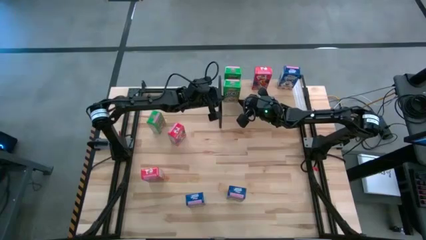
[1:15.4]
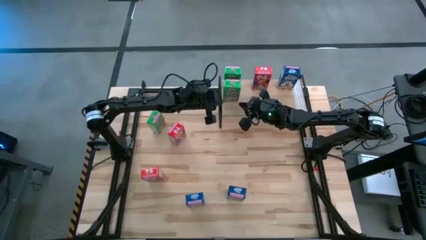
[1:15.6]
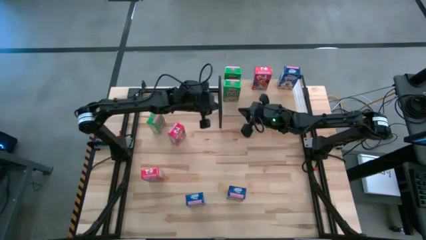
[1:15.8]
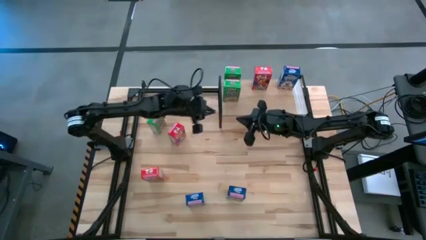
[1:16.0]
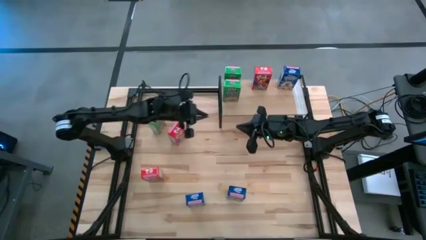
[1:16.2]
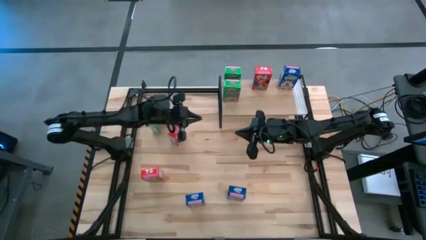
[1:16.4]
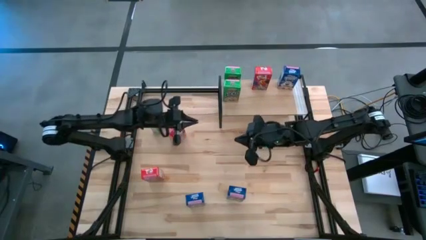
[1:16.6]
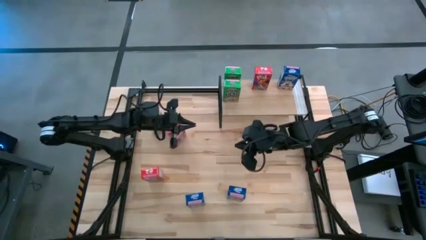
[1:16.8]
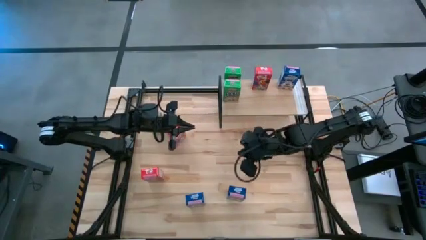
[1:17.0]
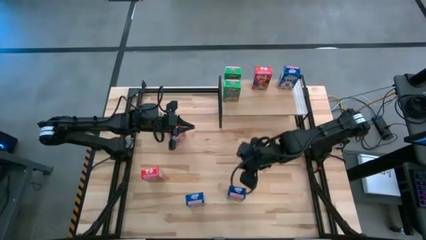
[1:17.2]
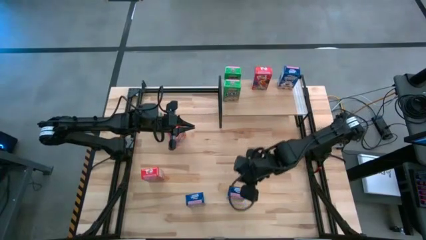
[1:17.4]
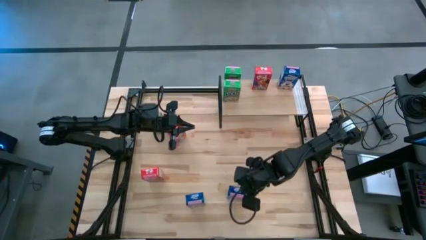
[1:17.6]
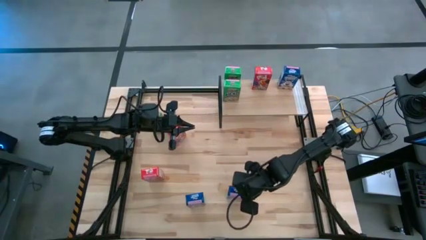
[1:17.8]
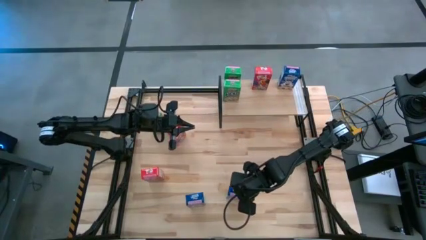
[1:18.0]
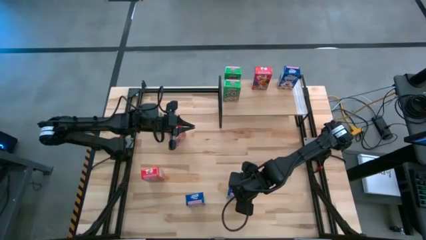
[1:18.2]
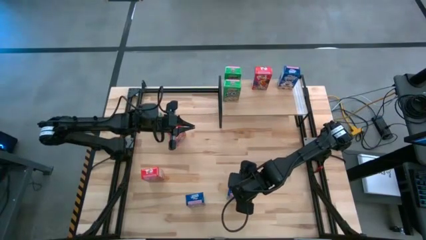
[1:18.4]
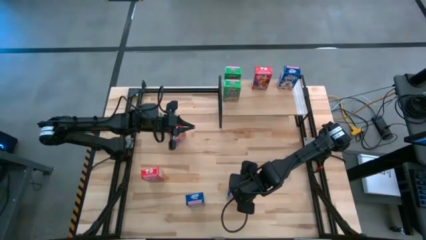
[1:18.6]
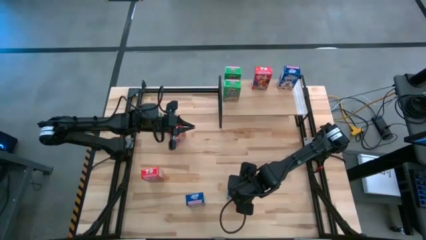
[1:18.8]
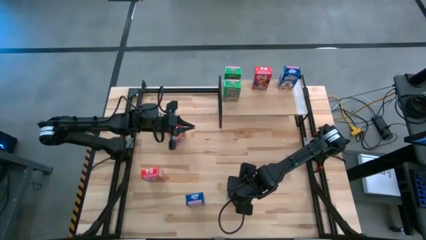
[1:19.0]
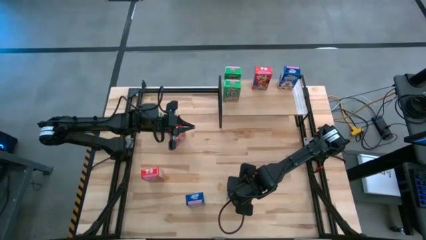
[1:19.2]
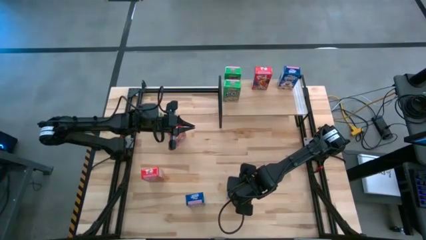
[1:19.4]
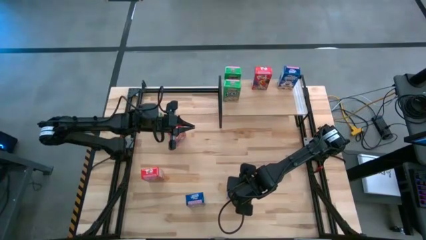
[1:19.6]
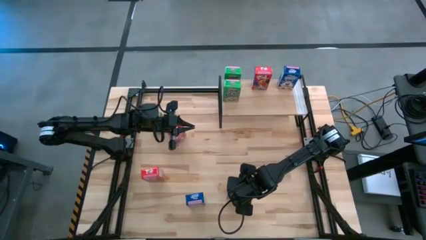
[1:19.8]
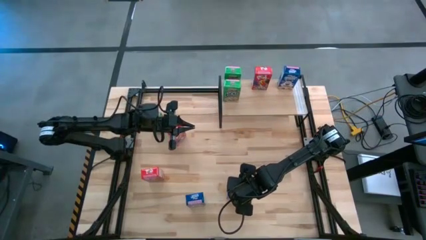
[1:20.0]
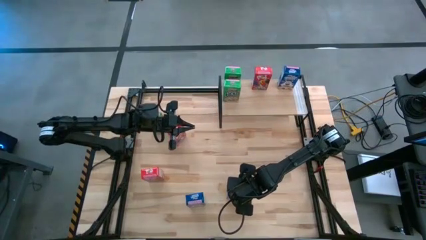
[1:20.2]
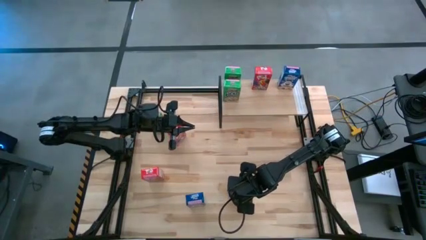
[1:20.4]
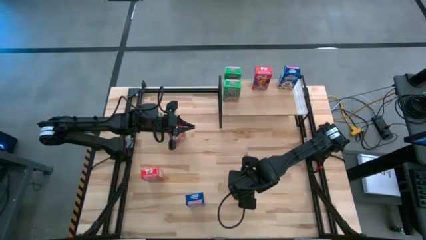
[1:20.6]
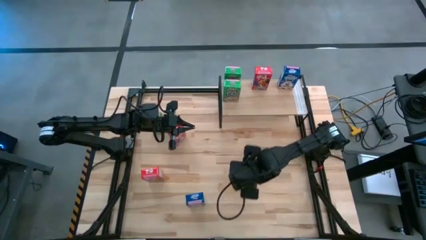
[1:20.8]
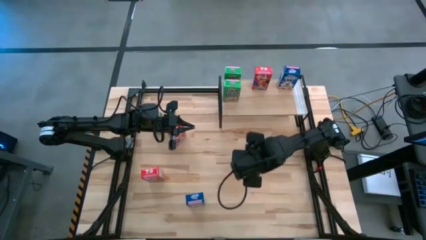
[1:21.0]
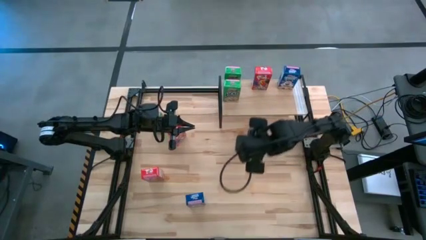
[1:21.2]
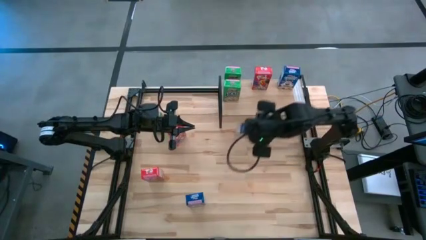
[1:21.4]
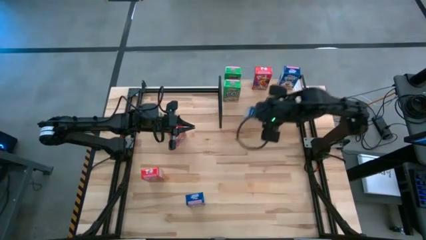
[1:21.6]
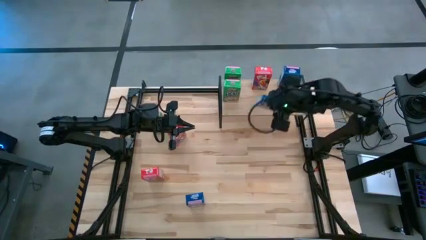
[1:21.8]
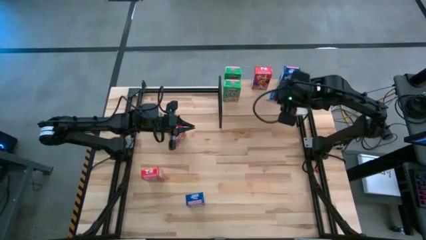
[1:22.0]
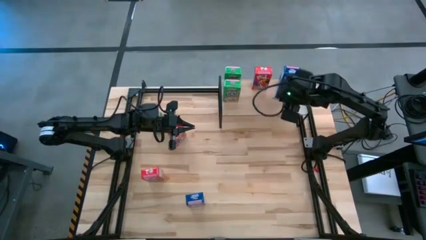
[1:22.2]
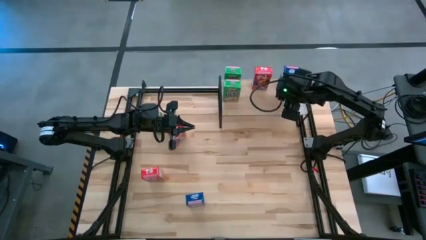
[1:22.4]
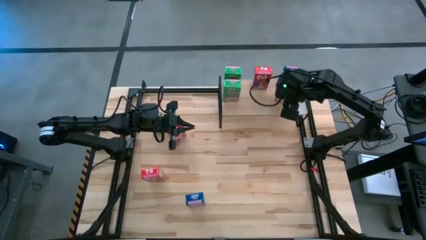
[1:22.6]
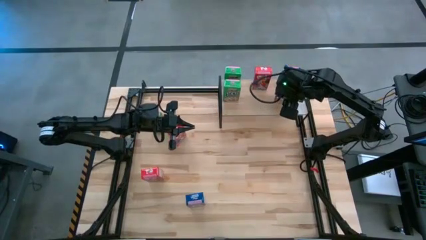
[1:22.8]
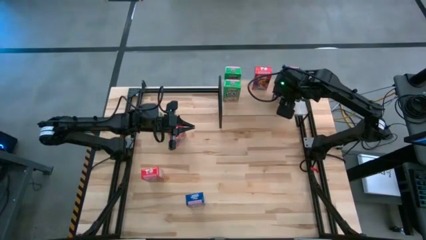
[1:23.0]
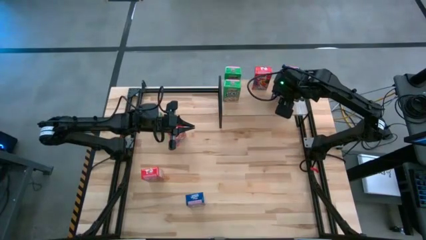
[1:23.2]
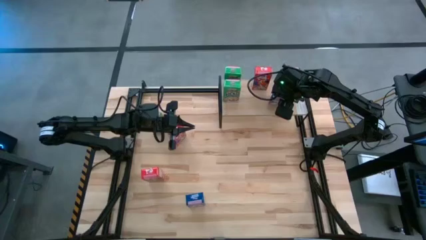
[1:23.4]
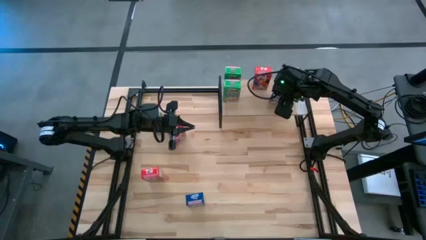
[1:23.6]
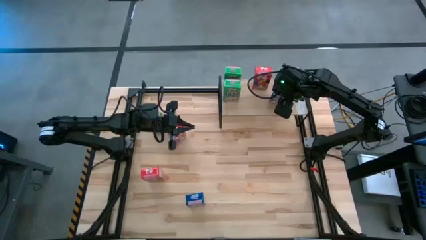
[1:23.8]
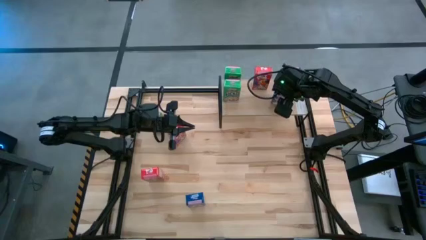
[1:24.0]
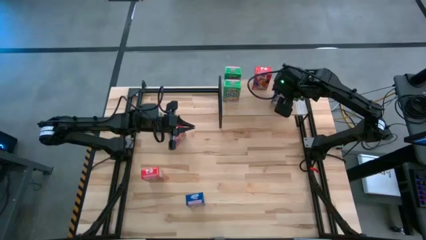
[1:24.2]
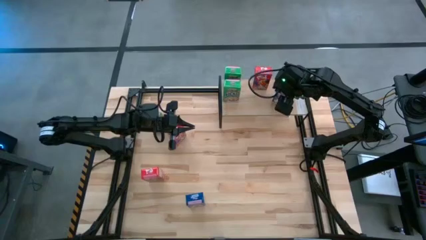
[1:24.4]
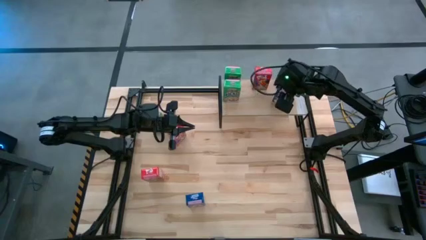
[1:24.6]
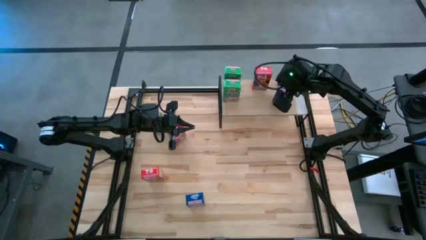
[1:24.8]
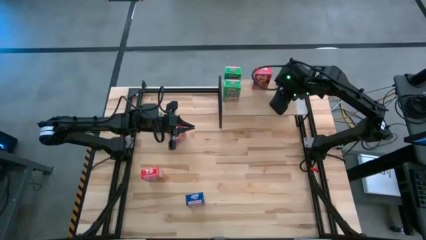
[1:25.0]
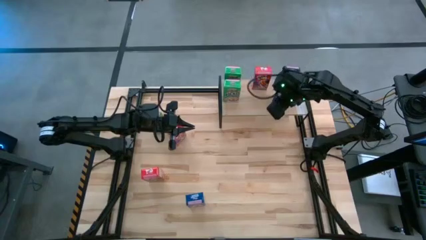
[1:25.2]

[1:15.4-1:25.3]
Task: Stack cereal on shelf
Put the right blue cereal box on the shelf aligned with other blue cereal boxes

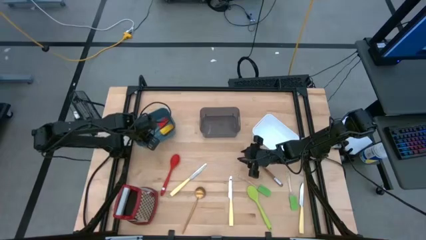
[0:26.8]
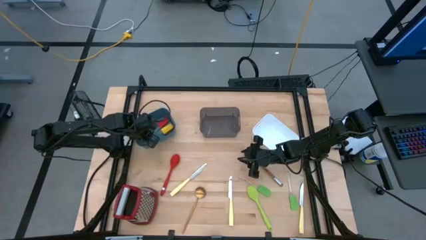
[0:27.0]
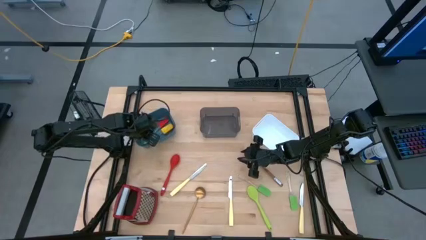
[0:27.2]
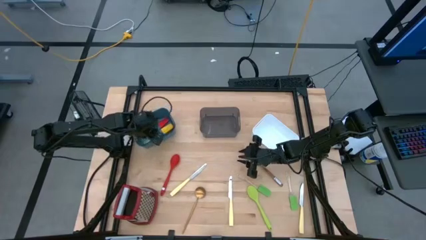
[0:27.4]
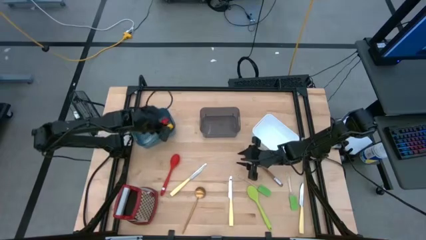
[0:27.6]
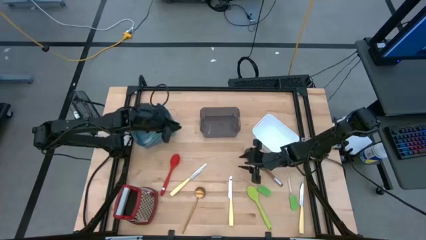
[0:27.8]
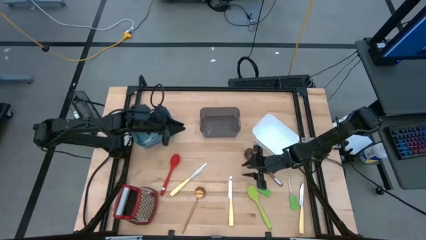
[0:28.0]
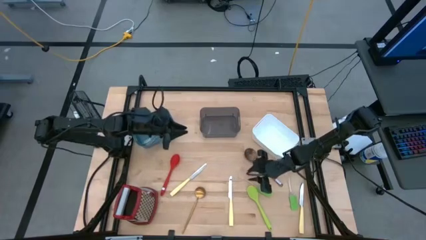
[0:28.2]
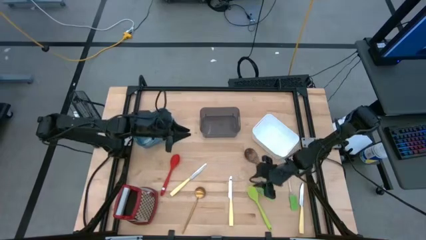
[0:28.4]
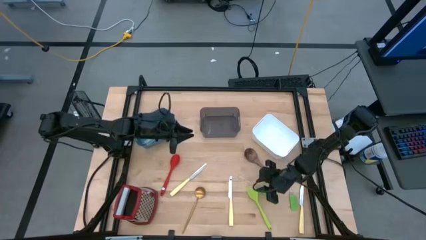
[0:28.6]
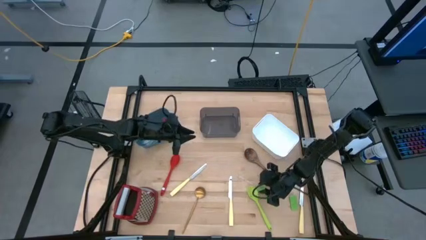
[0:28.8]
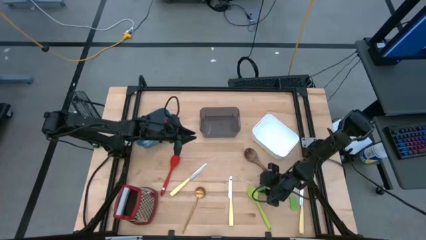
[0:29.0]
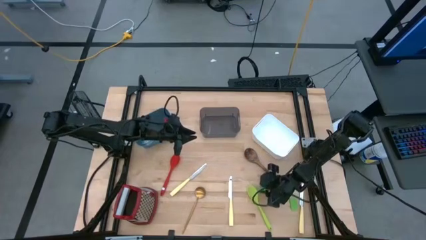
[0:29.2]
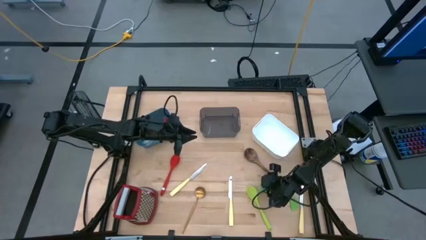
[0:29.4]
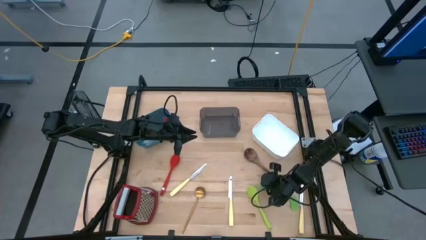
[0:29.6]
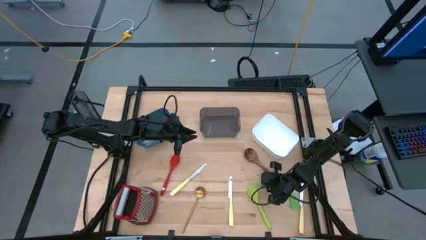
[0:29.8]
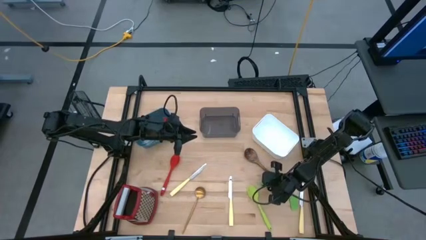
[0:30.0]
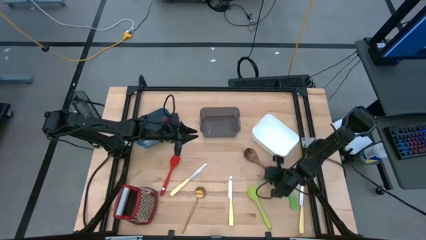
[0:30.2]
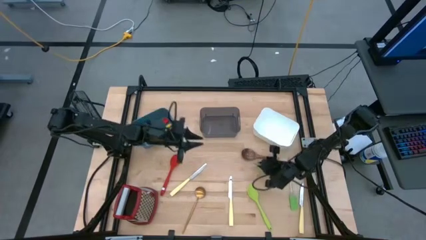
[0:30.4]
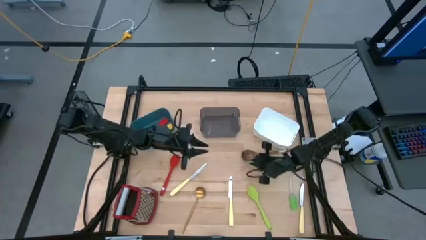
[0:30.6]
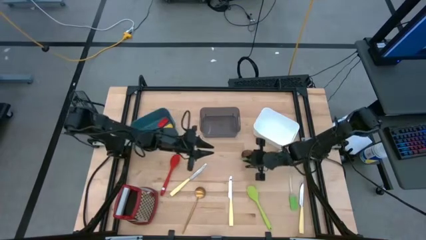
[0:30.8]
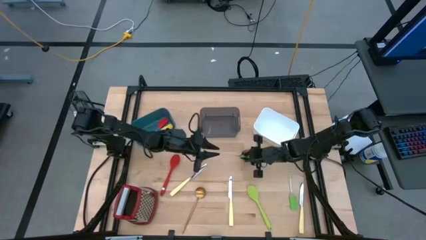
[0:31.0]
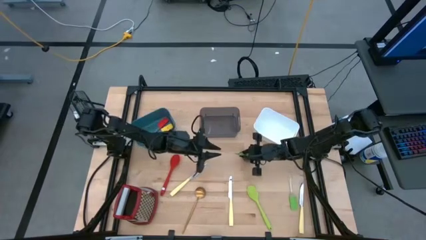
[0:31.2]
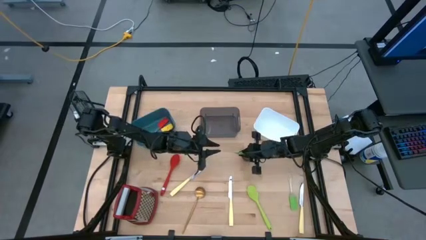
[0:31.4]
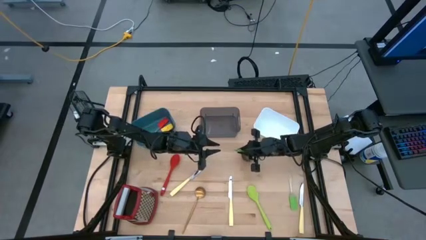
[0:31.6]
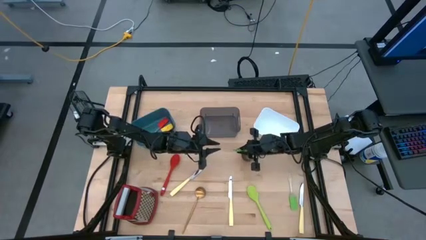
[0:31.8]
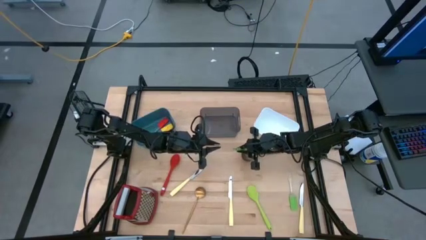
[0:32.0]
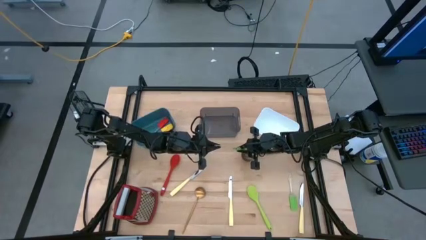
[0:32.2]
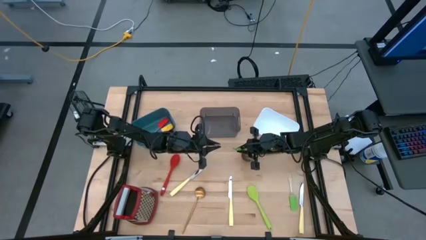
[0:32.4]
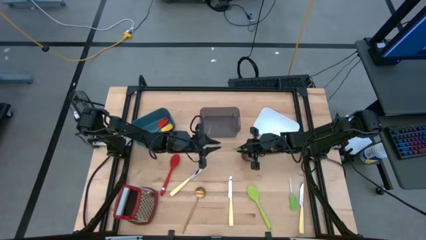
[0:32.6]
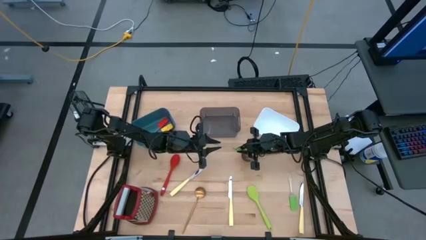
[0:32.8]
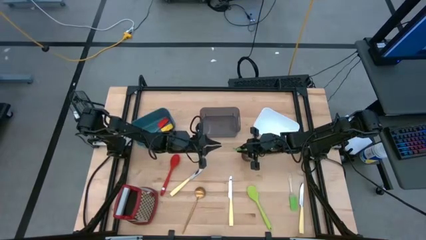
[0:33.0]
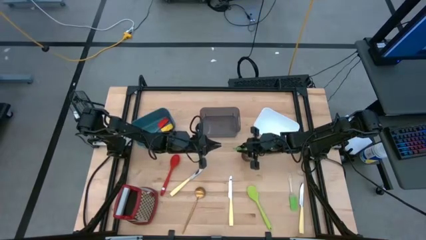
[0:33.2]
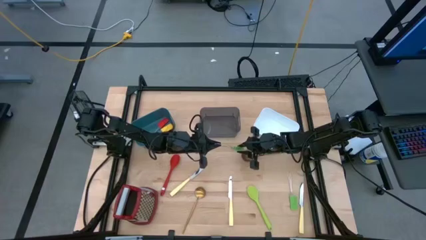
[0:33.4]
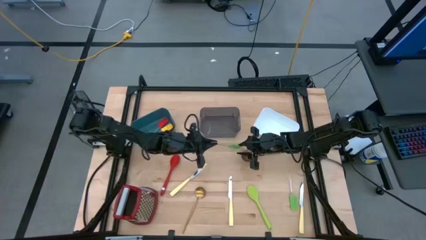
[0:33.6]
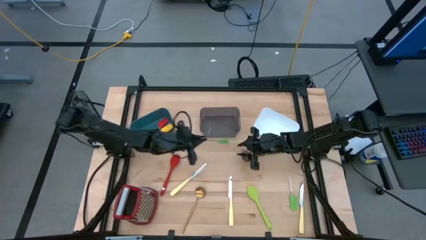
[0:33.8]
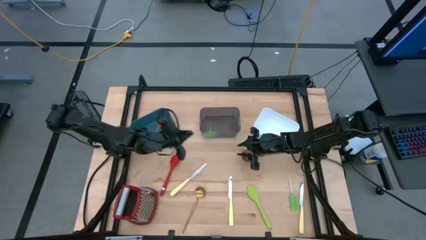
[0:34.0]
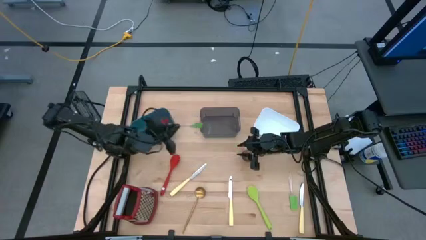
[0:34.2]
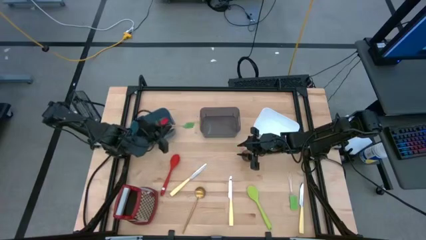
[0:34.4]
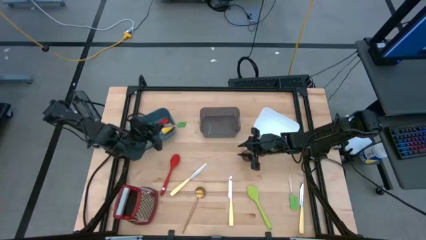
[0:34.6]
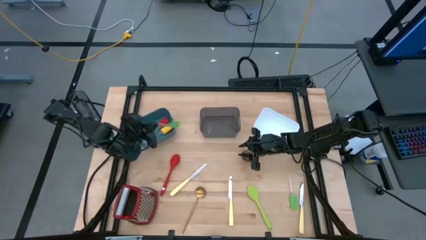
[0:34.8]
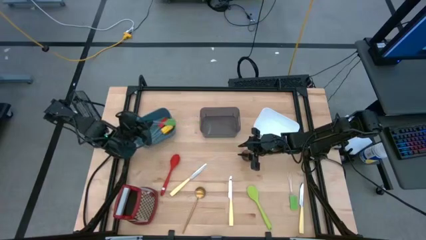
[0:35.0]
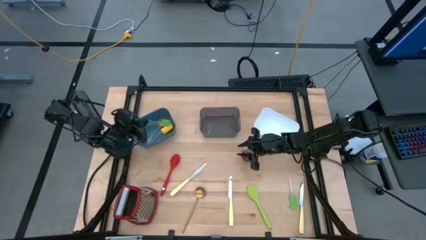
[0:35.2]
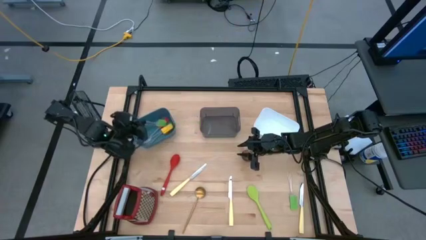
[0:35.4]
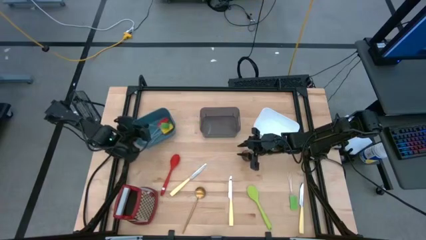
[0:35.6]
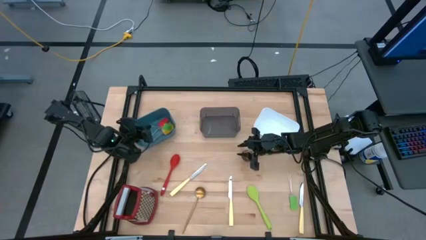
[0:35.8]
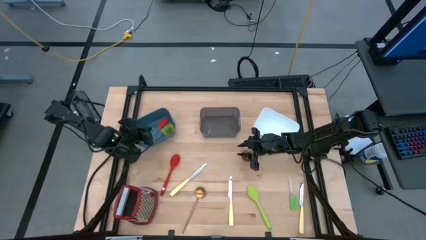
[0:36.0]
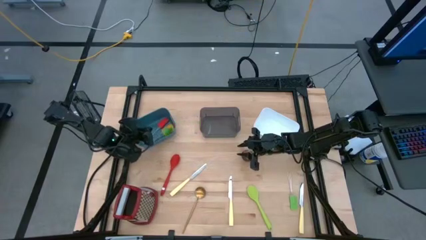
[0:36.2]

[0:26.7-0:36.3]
Task: Pick & Place Kitchen Items
Put the left green spatula into the blue bin
